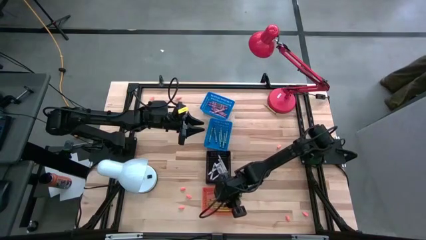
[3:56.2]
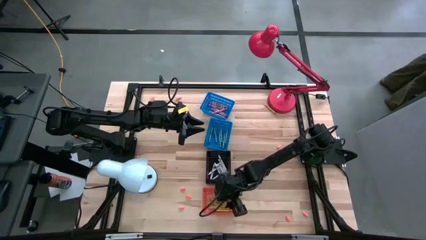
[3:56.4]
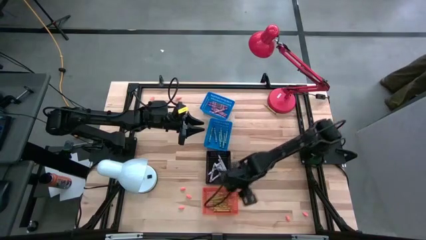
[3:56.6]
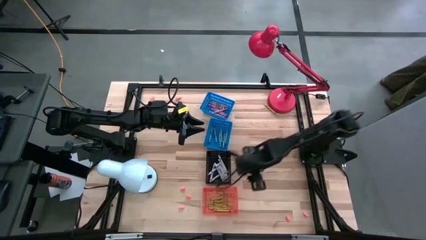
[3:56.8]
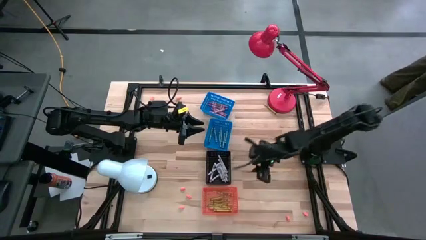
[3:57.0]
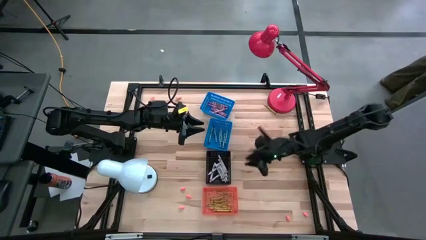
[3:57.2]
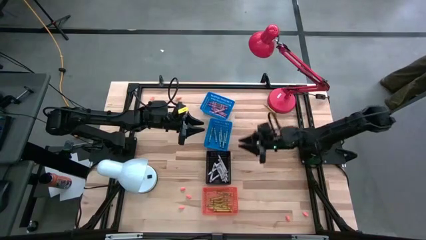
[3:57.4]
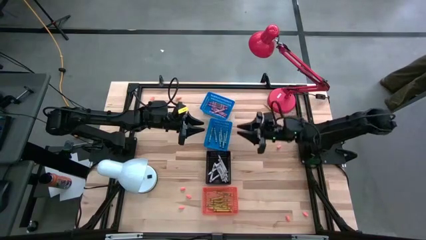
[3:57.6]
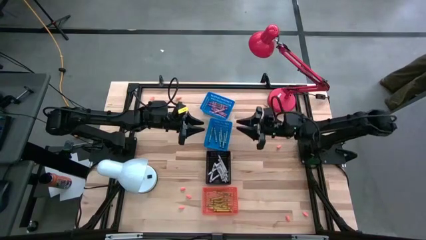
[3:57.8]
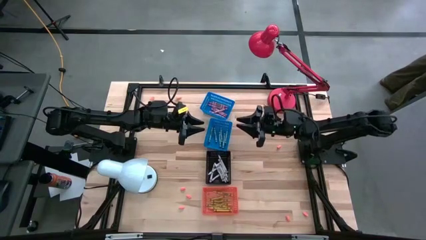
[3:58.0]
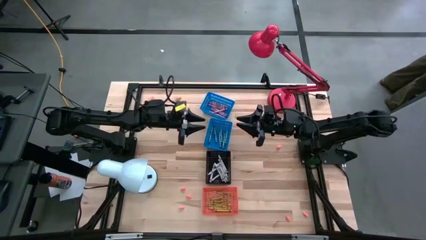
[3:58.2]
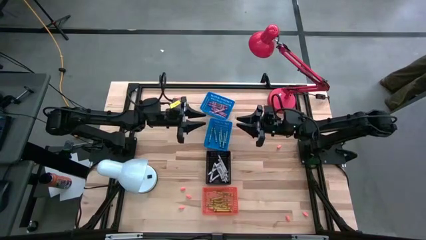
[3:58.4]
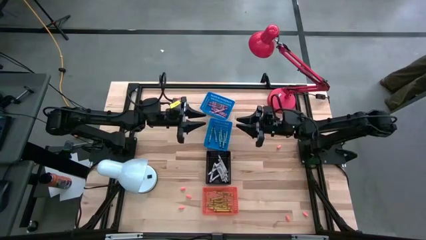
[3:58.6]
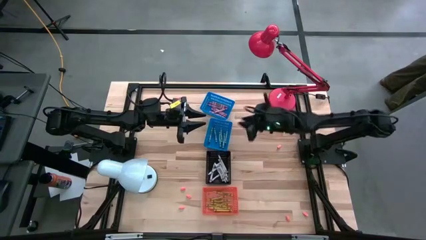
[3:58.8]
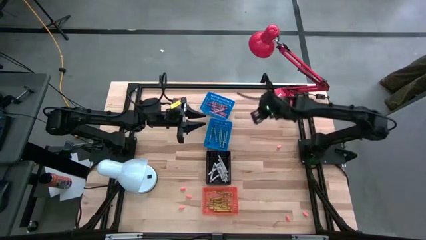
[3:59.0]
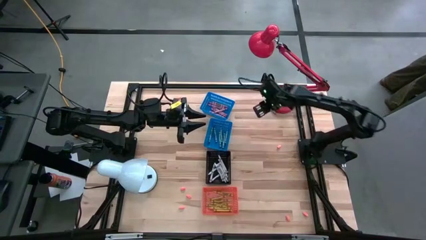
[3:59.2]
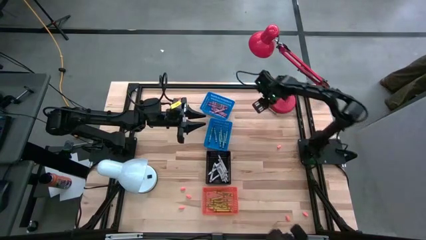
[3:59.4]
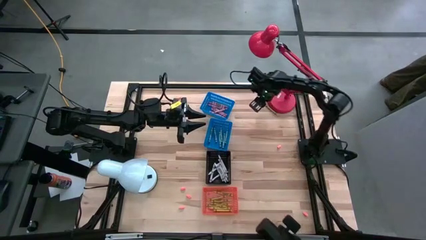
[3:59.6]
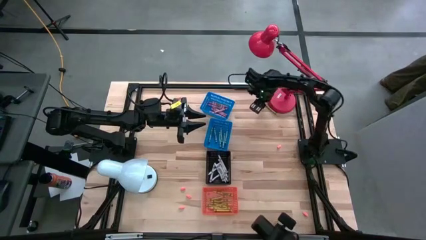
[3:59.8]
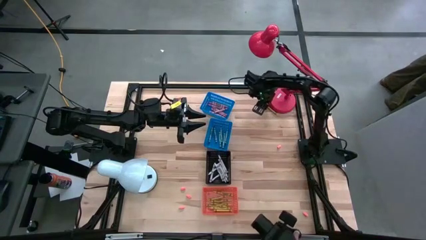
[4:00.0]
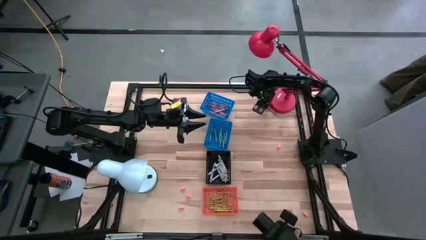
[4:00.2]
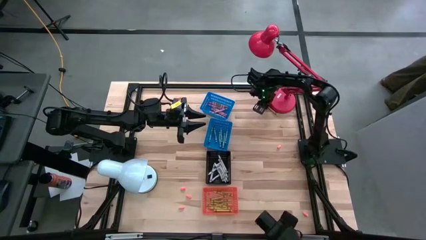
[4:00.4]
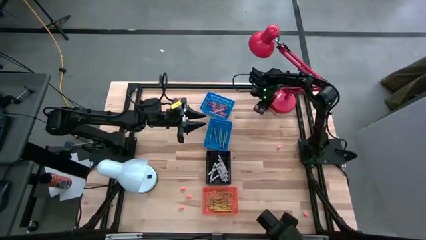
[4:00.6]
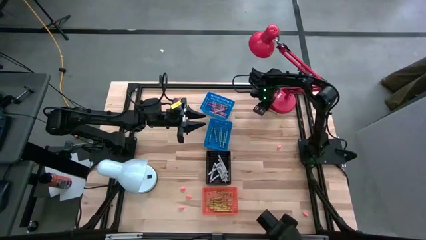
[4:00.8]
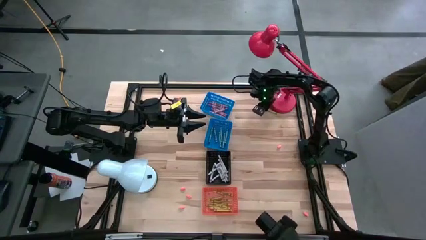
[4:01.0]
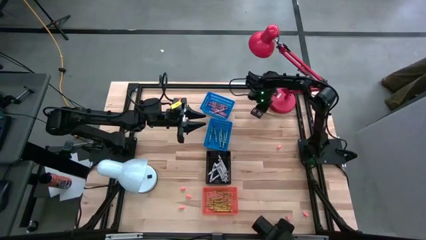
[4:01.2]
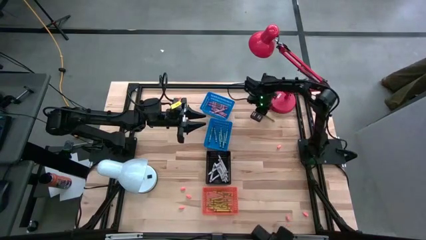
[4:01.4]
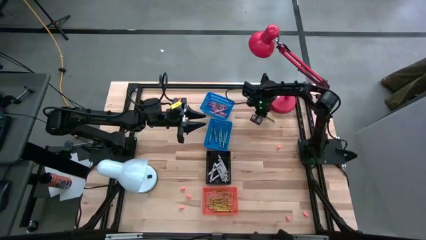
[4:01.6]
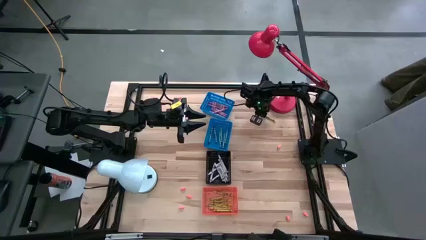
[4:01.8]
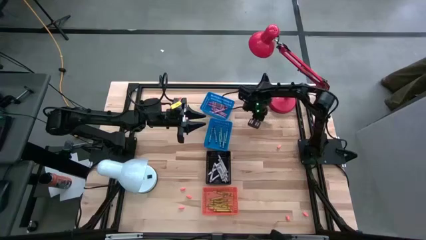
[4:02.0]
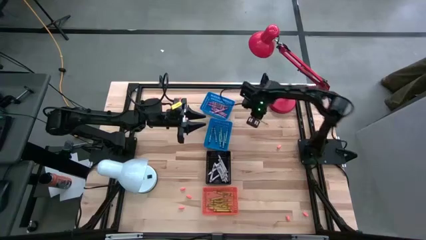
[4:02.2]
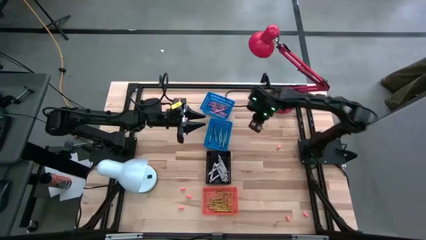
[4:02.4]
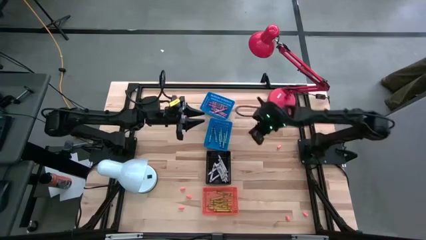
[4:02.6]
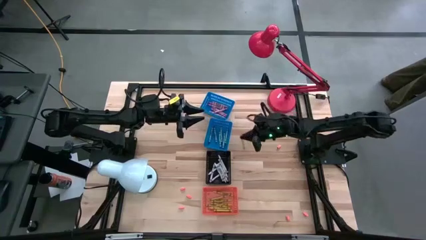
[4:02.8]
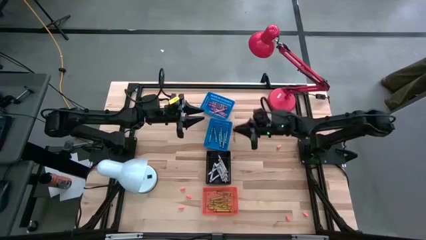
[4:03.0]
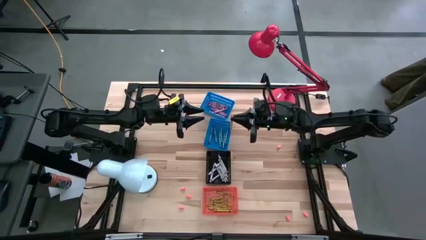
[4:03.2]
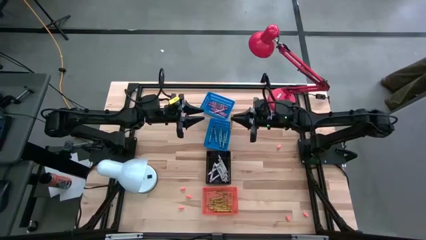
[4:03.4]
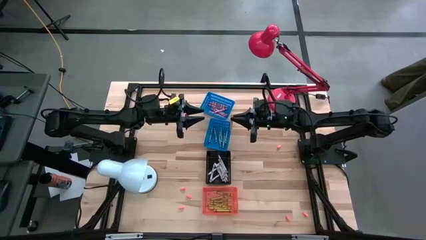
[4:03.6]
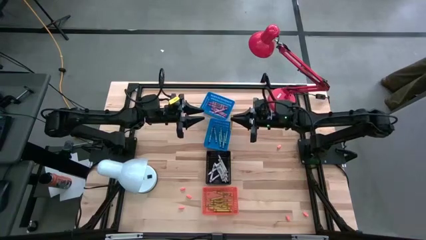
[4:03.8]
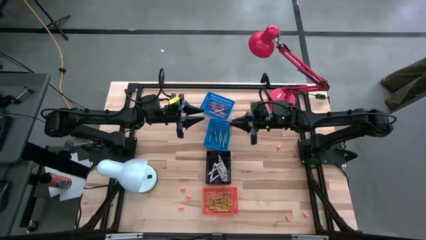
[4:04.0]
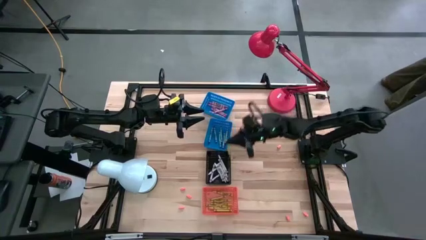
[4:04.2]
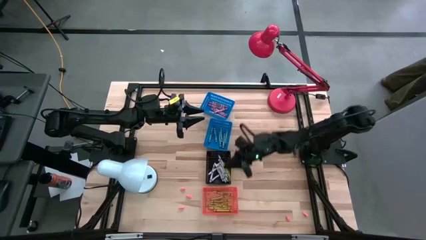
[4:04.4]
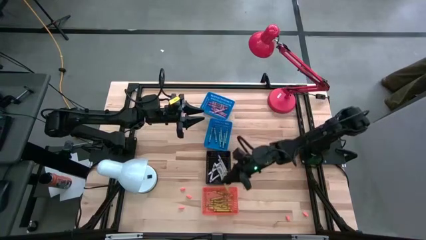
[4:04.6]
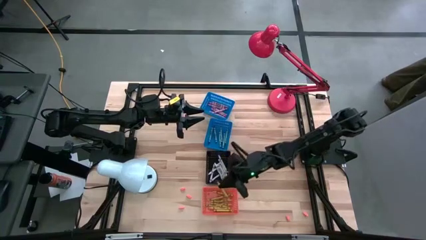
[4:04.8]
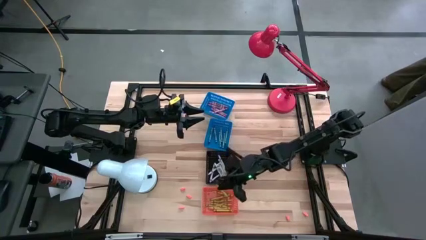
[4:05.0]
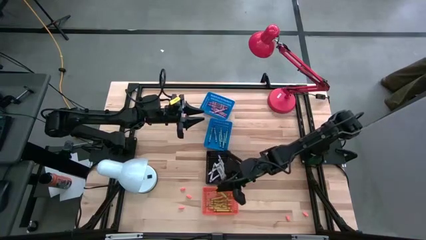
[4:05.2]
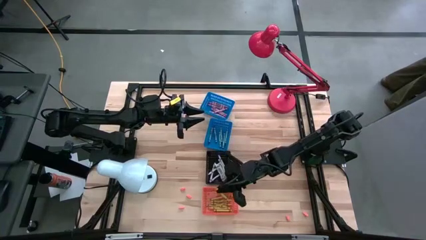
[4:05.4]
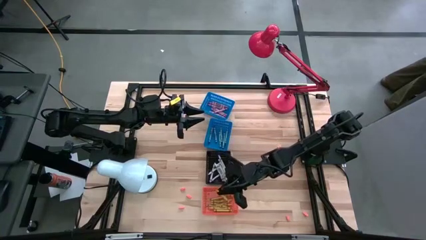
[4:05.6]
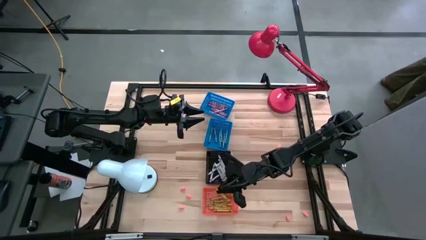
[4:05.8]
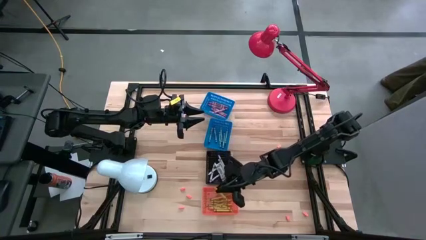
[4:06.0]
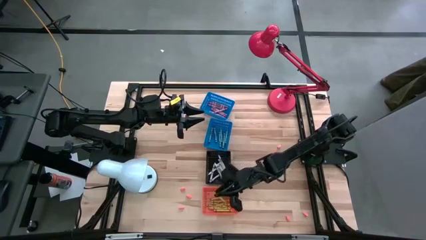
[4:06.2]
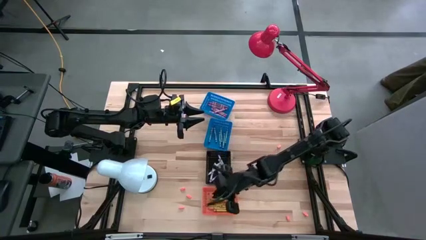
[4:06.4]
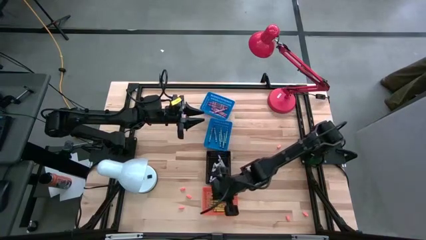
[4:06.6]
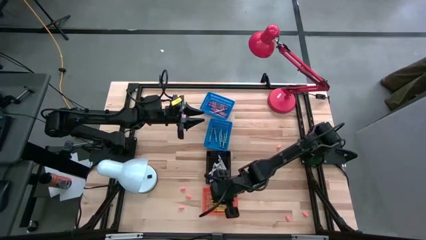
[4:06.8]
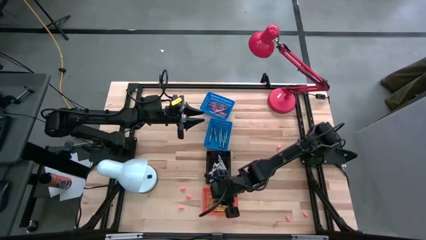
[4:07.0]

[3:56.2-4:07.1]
Task: Sort crayons
Put the yellow crayon into the orange bin
